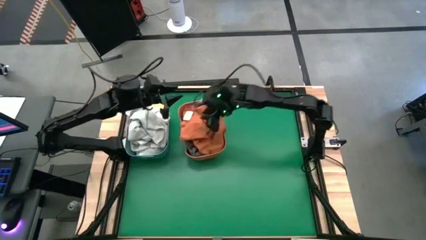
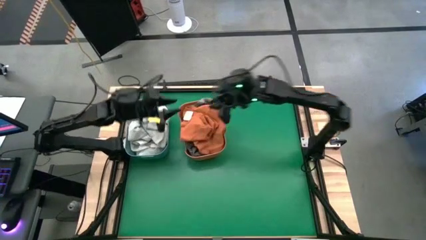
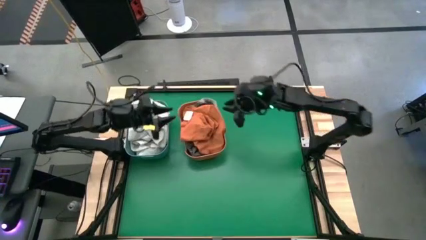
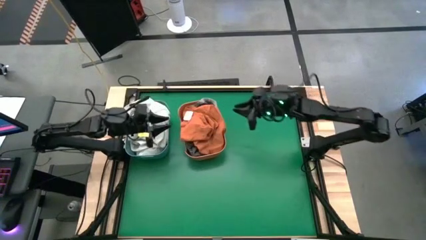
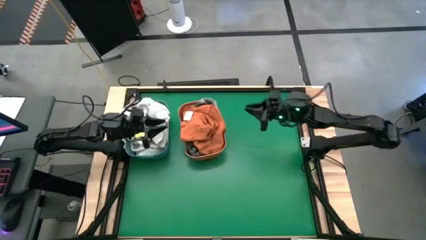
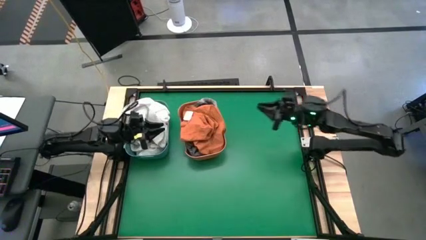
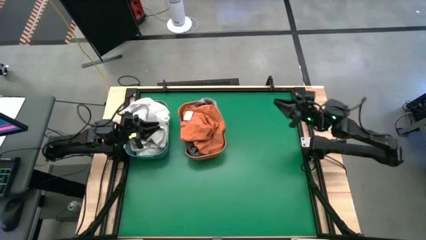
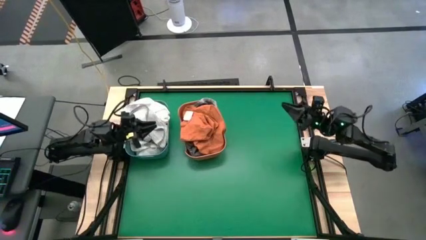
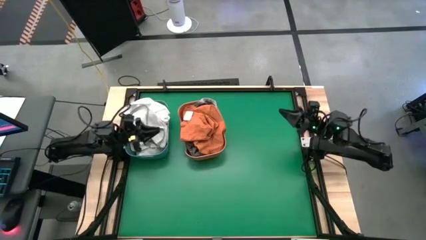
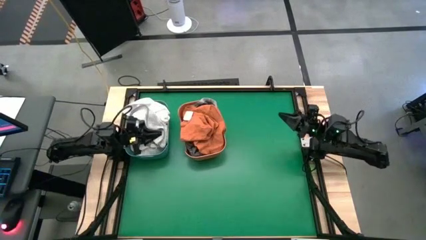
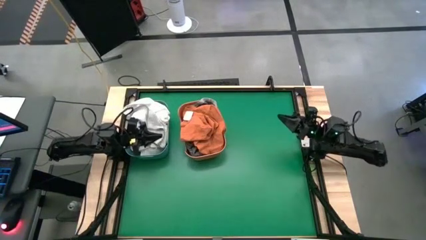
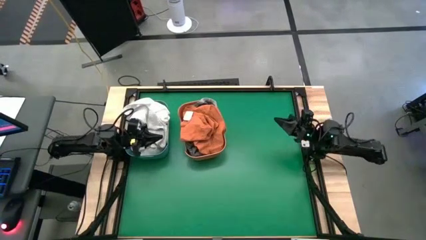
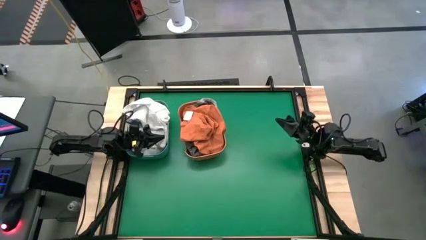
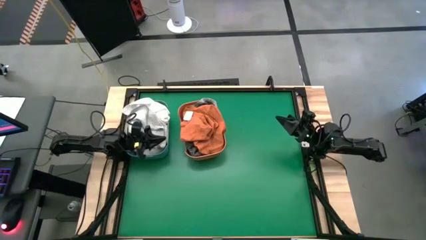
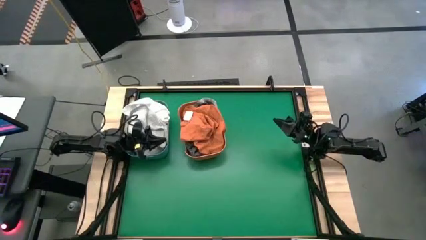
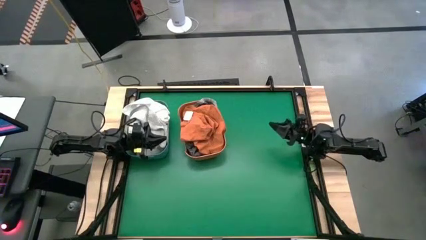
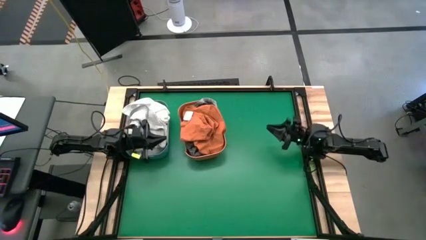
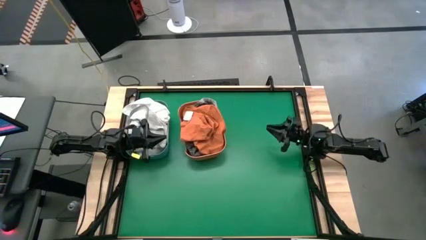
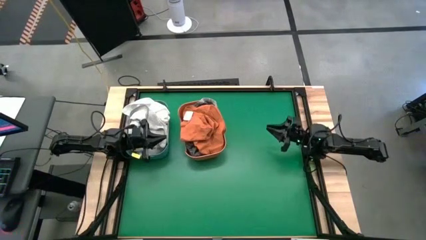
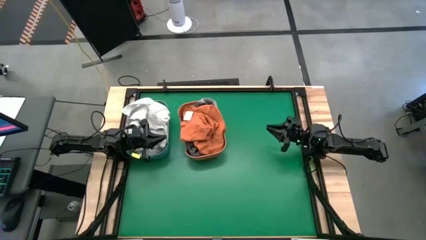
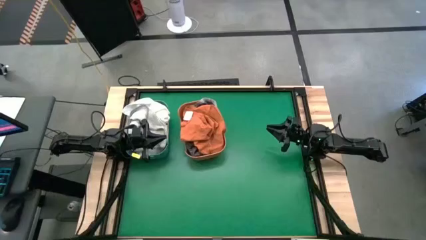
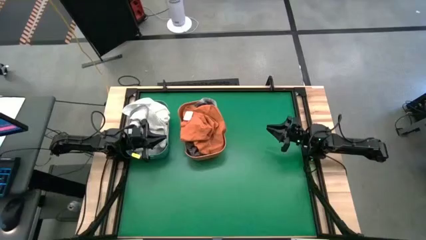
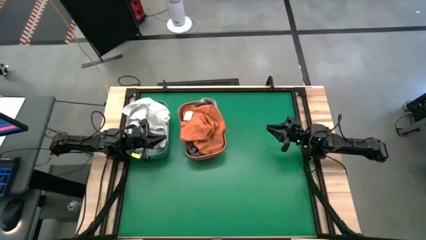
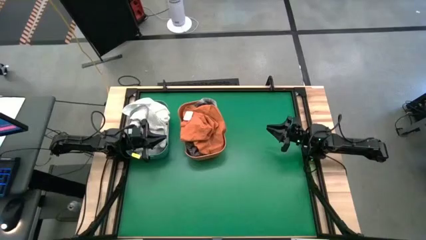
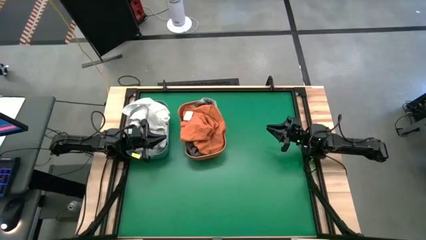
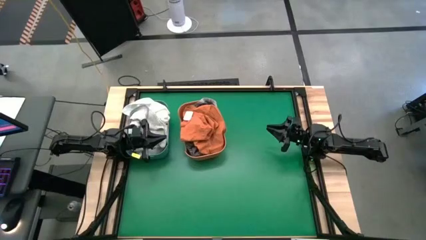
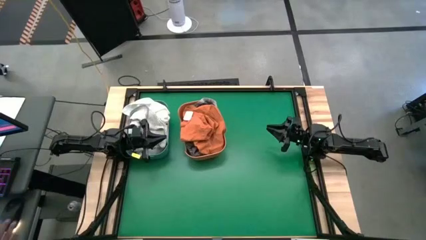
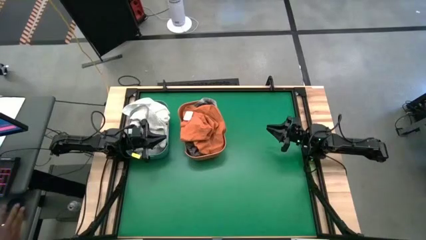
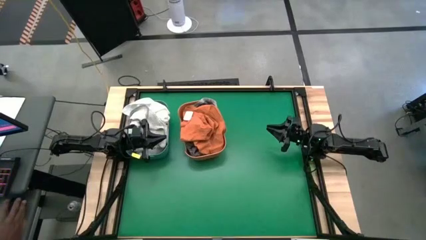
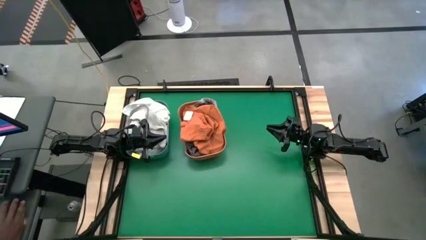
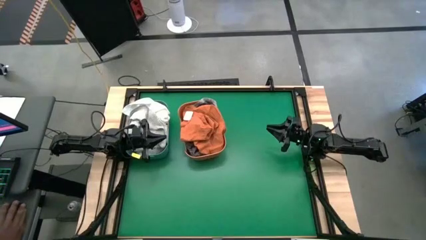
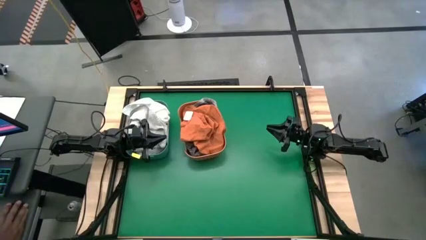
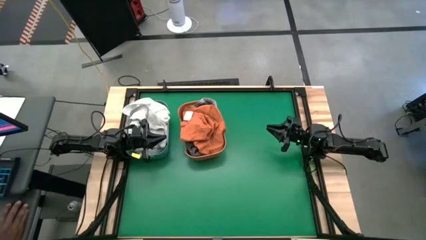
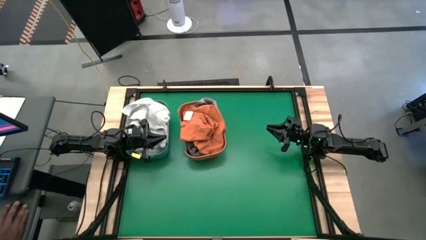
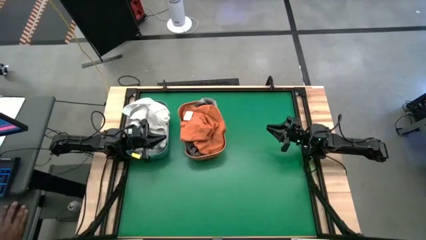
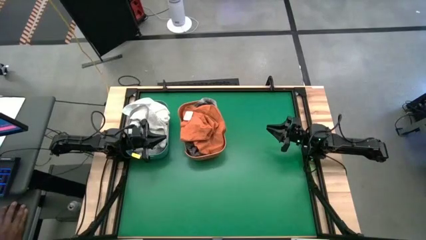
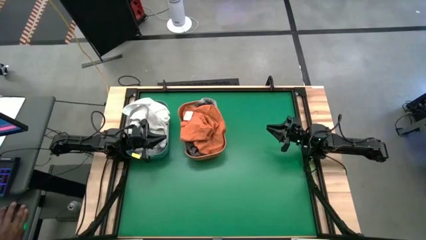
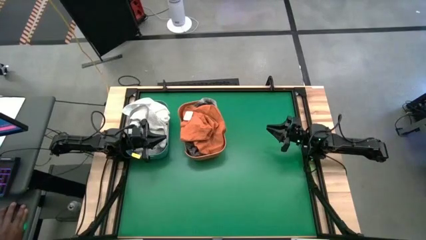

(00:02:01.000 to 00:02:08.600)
Task: Sort towels by color in basket
Return to Home Position

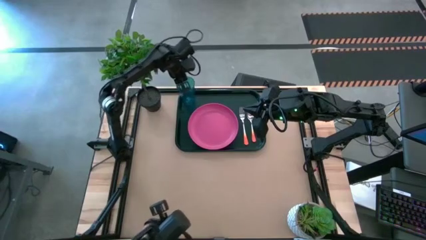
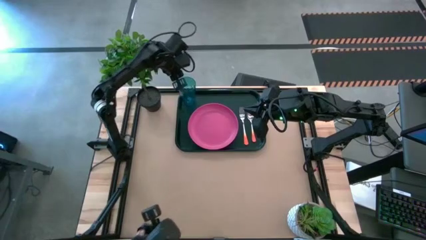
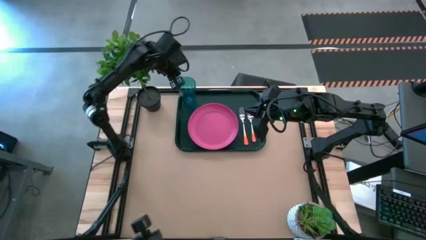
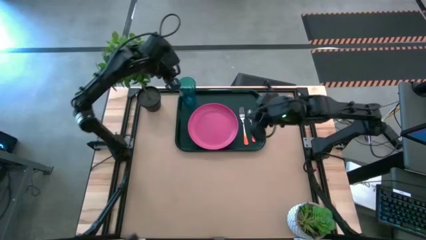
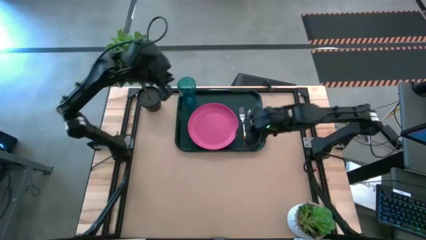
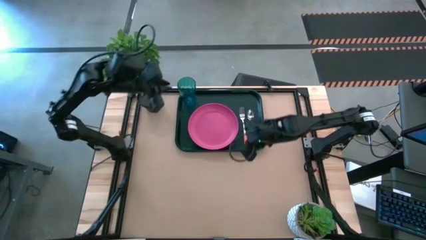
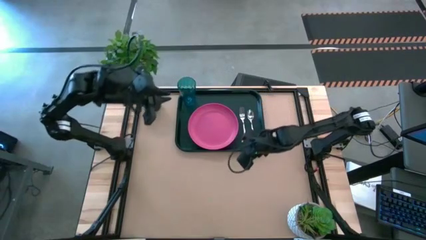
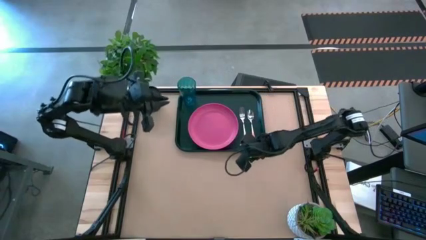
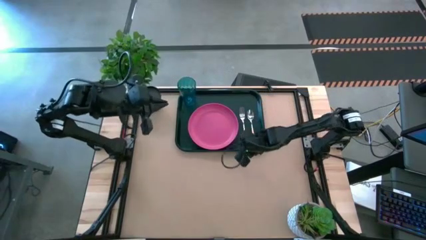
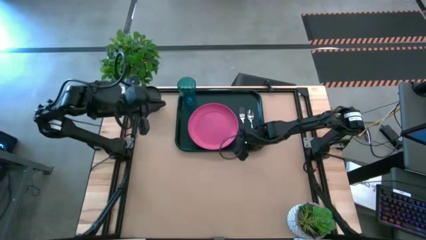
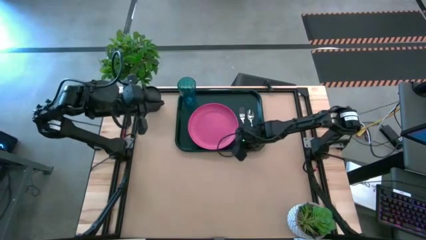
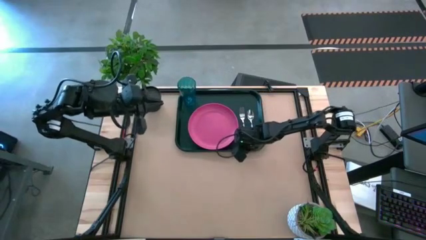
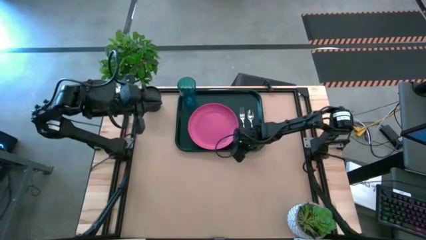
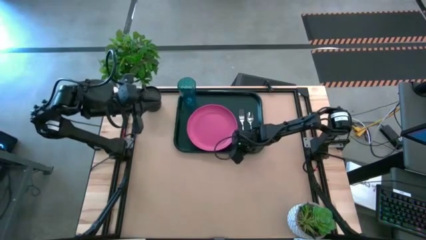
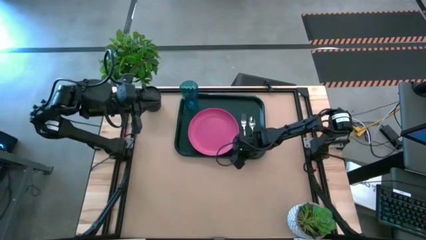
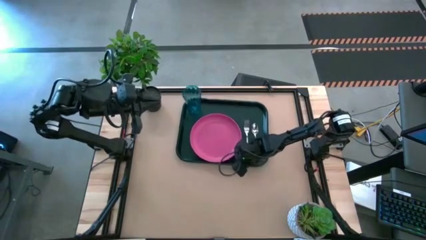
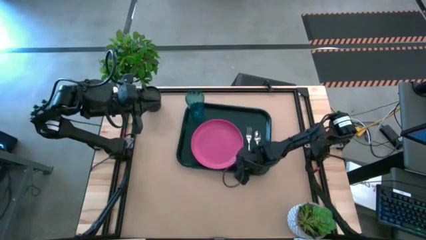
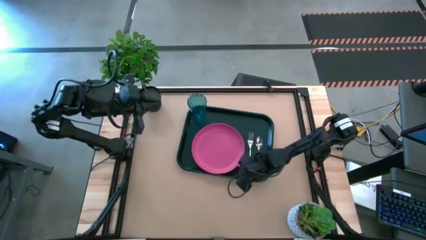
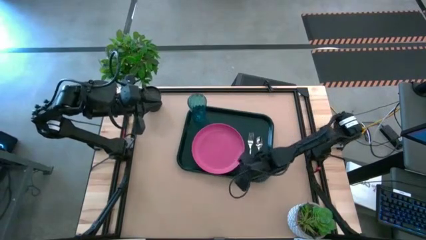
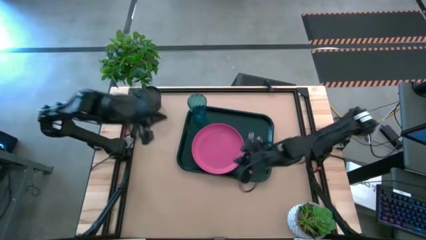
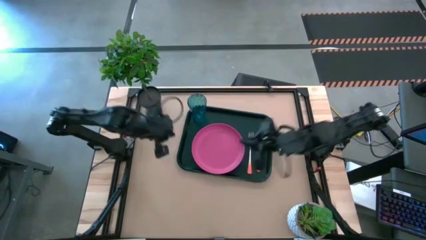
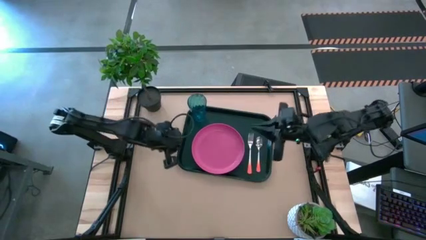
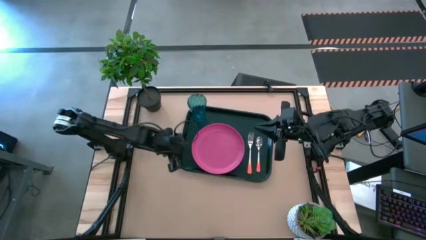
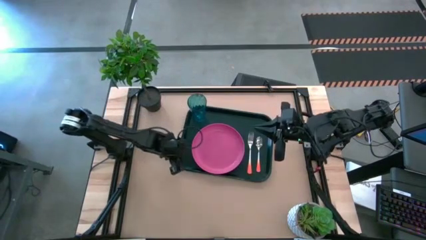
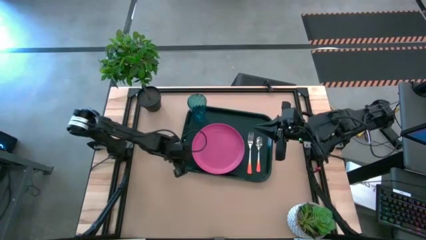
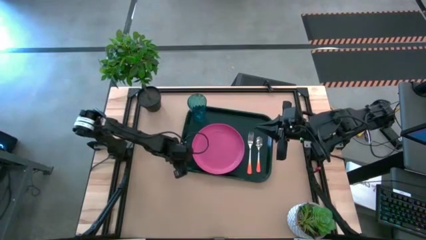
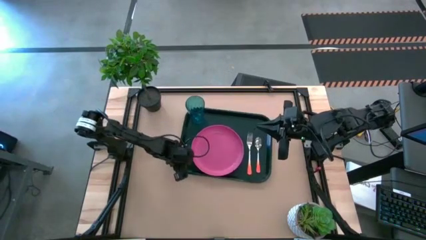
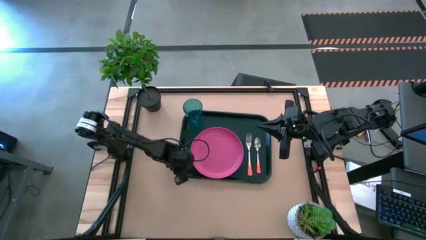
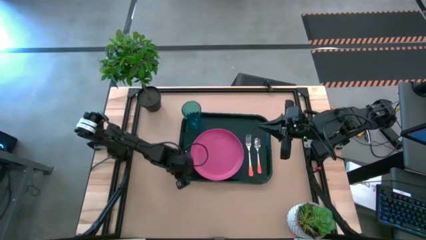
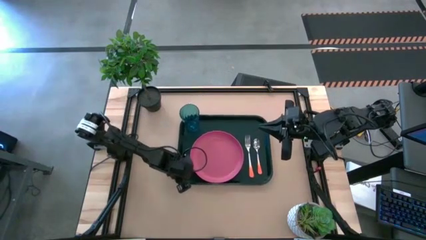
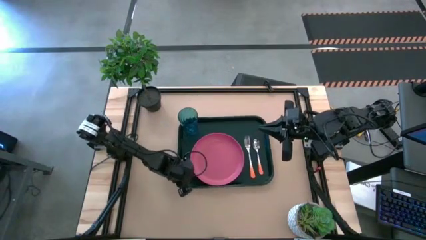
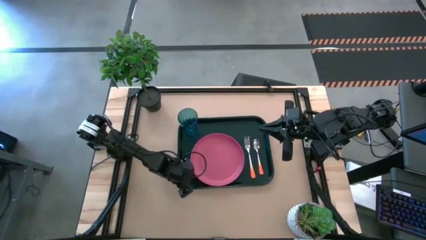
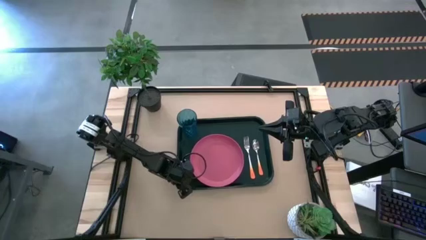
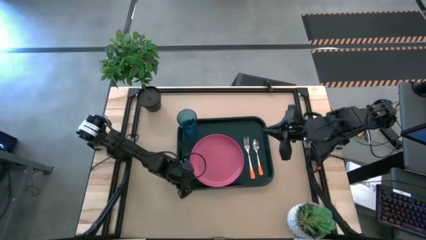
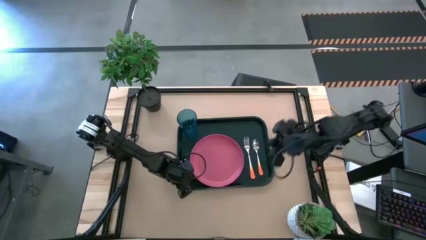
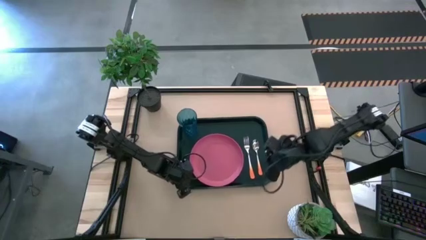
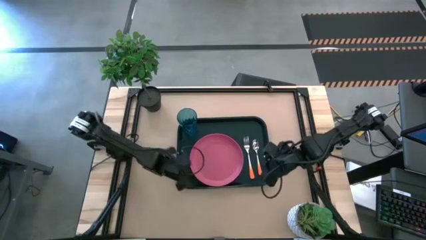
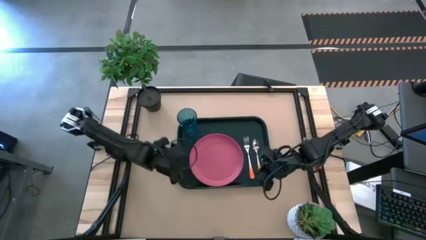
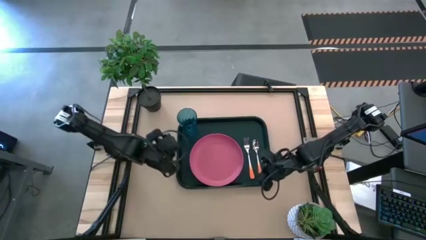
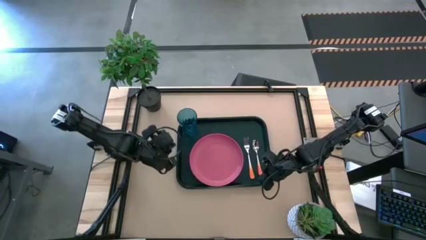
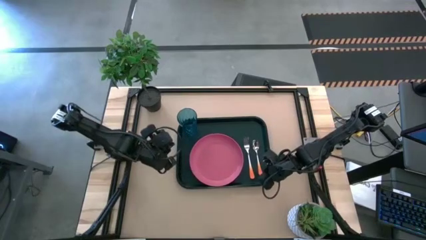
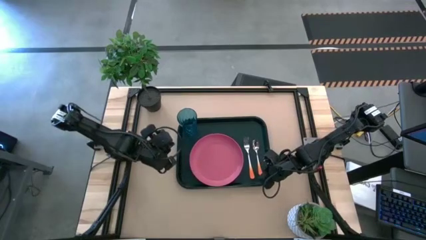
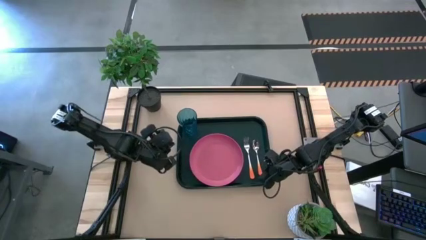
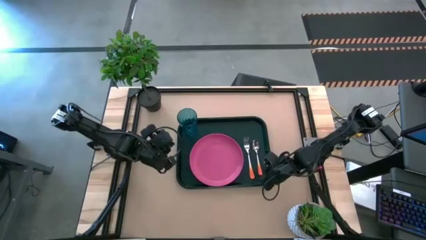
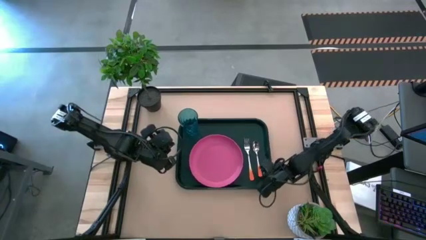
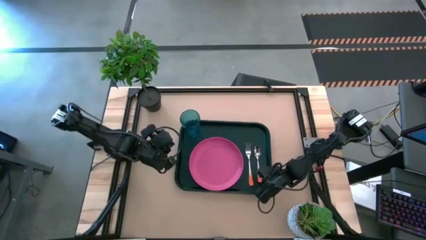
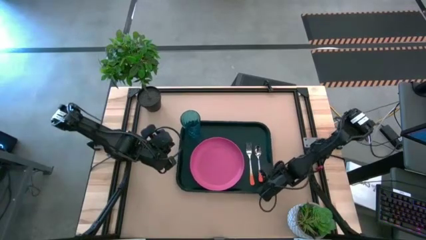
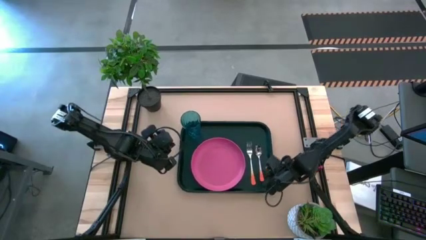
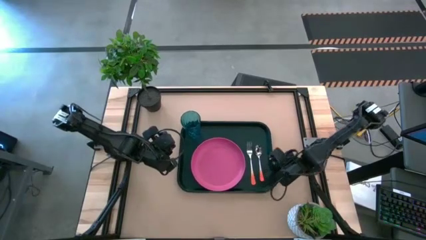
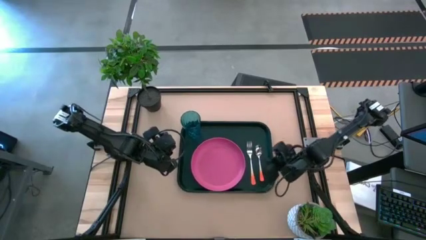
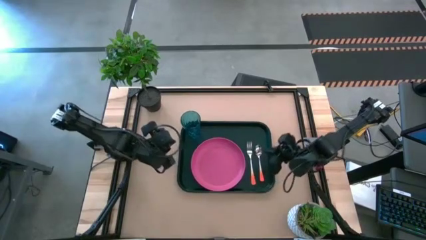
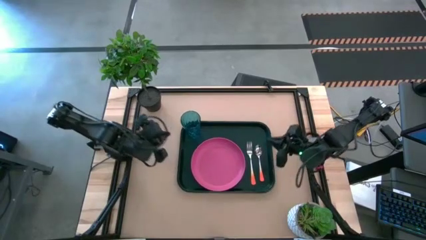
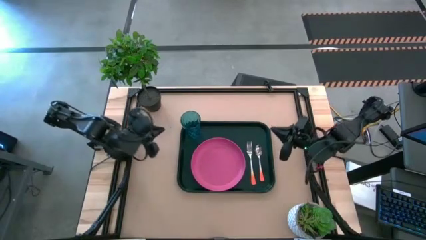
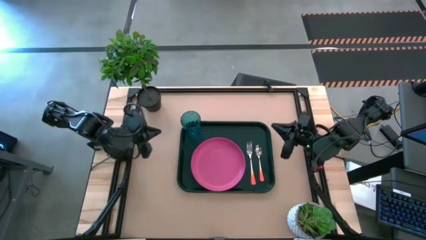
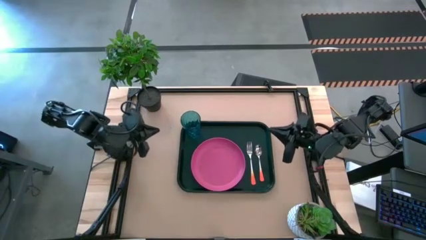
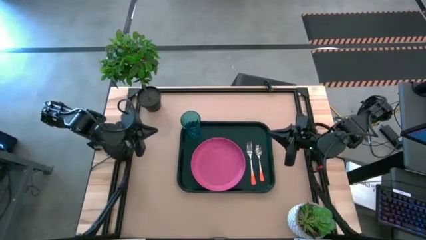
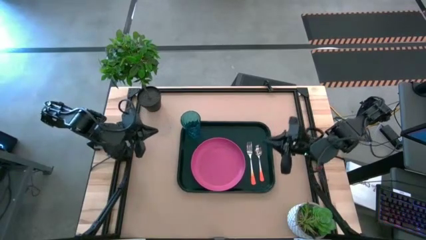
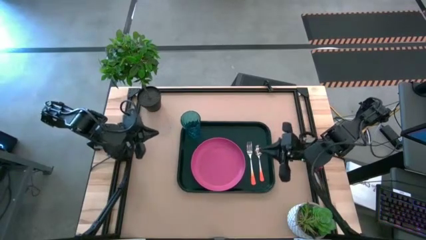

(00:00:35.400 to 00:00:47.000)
Task: Pick and place plate/cup/fork/spoon on tray
Move the green tray to the center of the table
